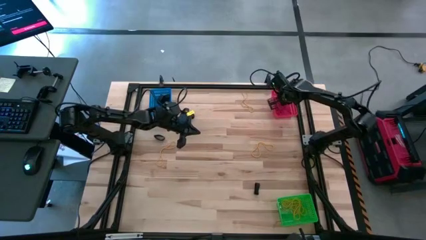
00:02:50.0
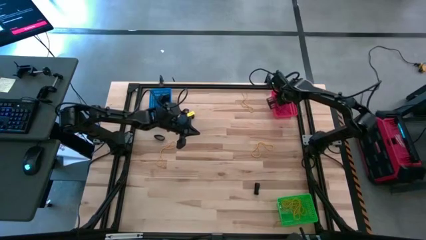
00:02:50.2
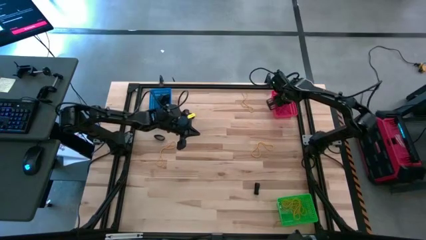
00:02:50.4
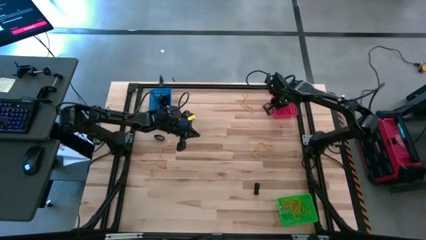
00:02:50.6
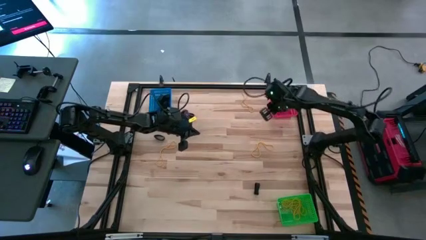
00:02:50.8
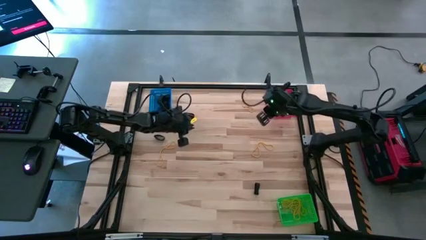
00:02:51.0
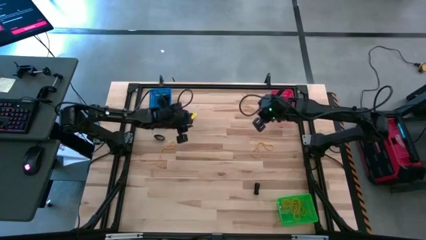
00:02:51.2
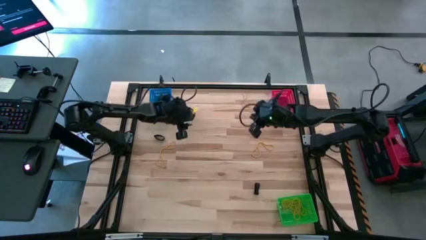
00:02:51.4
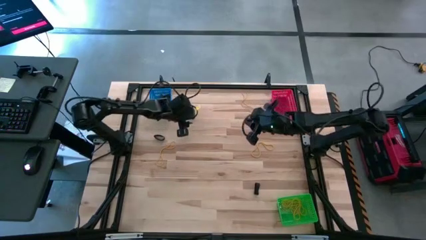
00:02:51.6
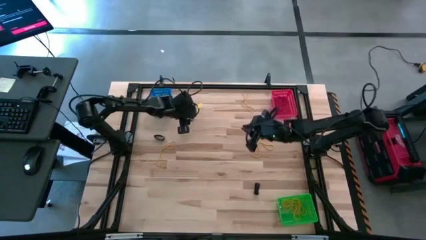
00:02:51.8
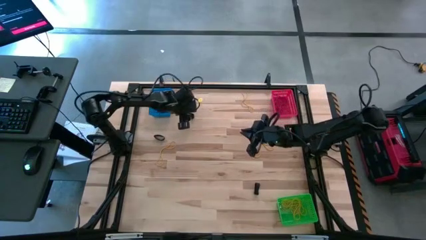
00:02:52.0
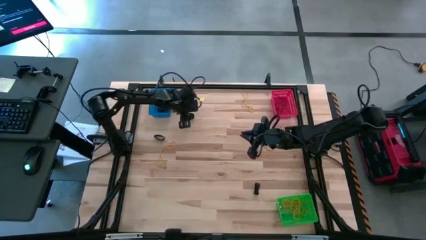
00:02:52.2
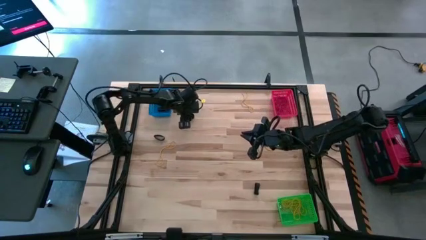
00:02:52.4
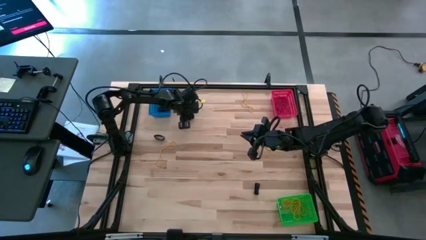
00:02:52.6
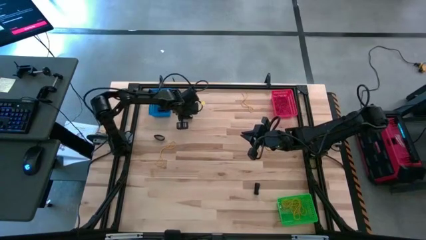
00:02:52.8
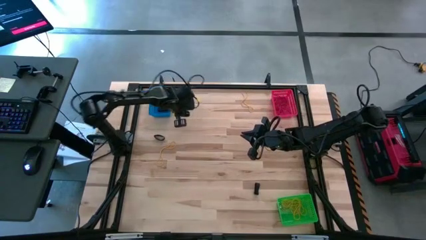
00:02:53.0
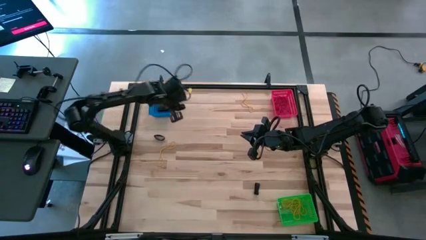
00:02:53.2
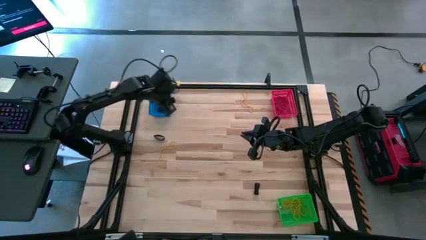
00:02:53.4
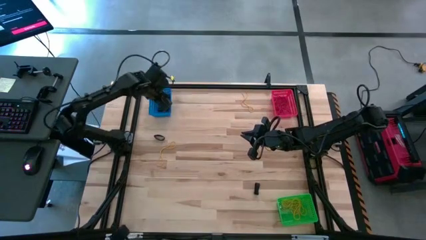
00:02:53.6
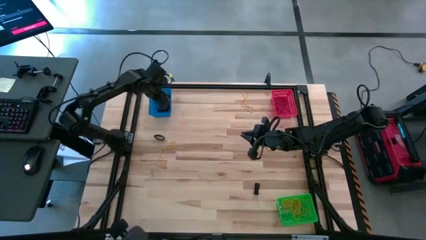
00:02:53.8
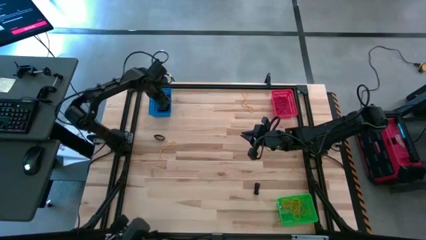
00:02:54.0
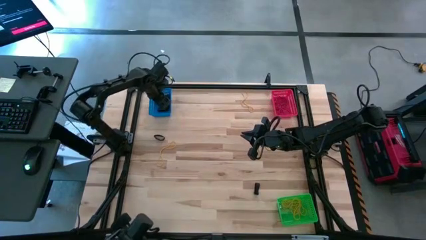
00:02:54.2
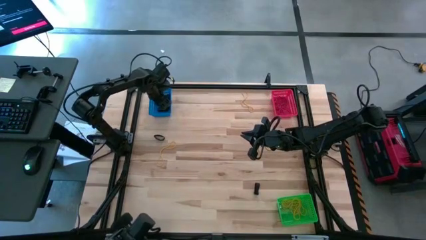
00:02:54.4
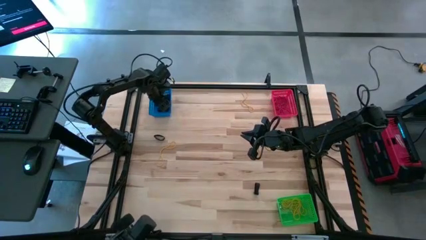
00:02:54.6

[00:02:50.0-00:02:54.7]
Task: Sort rubber bands into baskets
Put the black rubber band into the blue bin

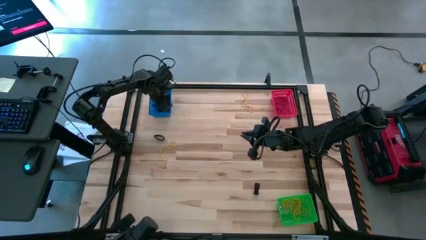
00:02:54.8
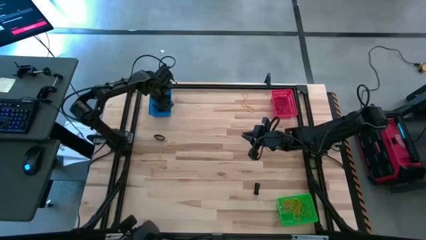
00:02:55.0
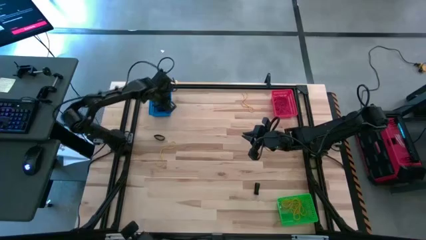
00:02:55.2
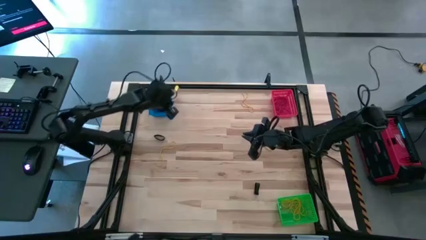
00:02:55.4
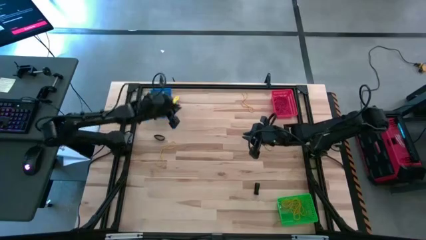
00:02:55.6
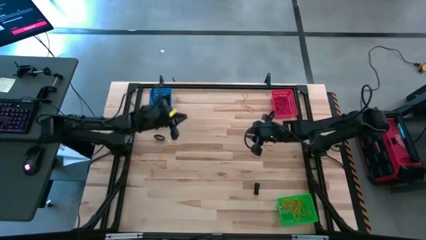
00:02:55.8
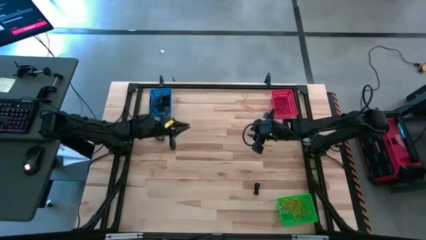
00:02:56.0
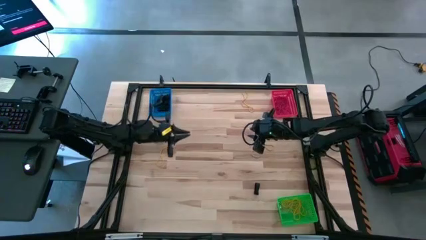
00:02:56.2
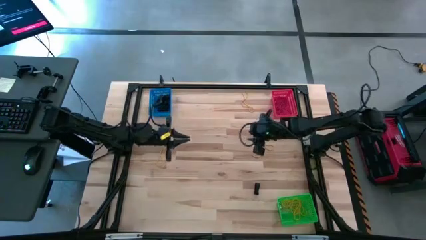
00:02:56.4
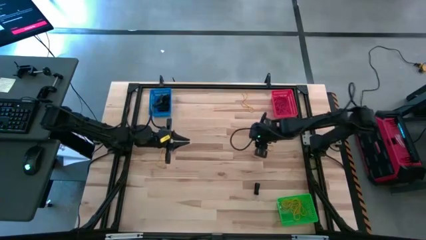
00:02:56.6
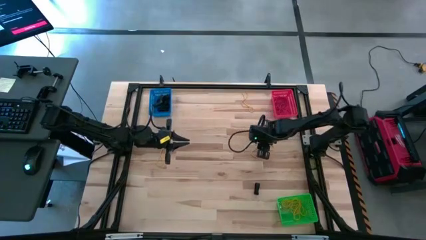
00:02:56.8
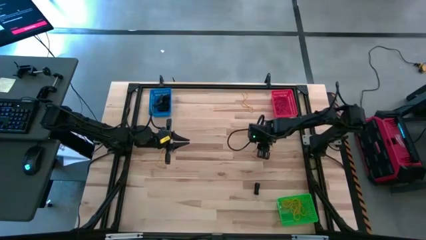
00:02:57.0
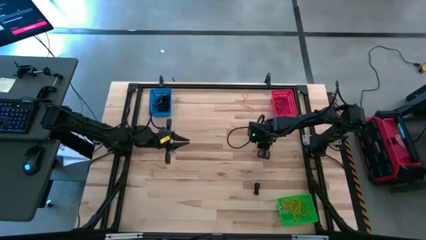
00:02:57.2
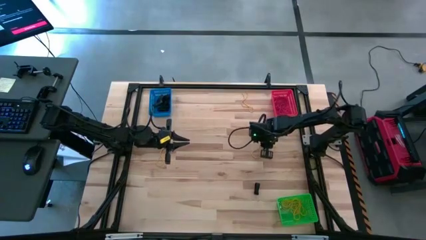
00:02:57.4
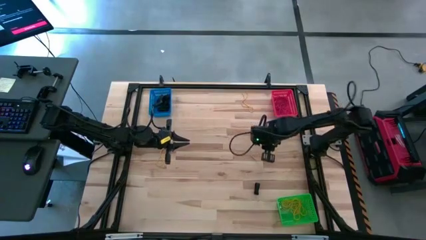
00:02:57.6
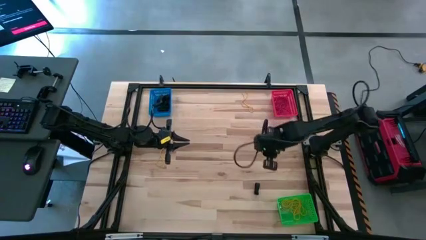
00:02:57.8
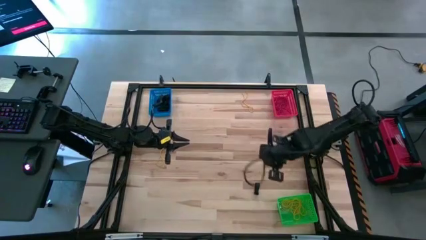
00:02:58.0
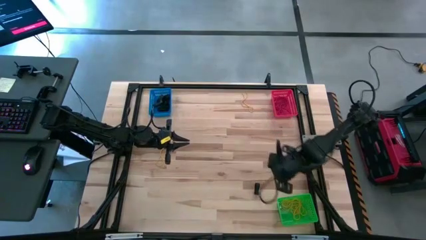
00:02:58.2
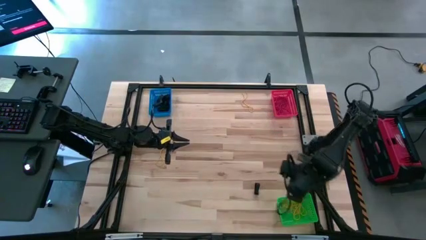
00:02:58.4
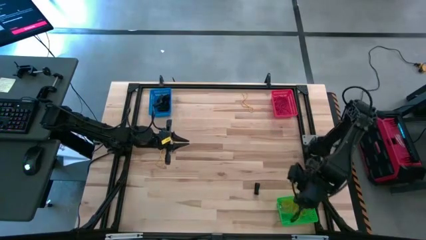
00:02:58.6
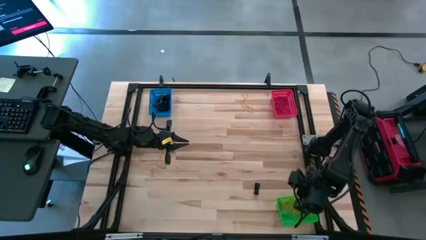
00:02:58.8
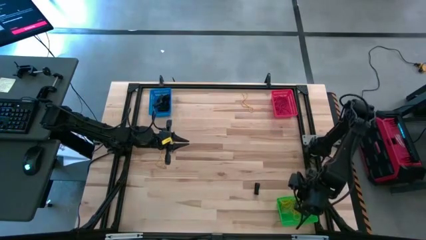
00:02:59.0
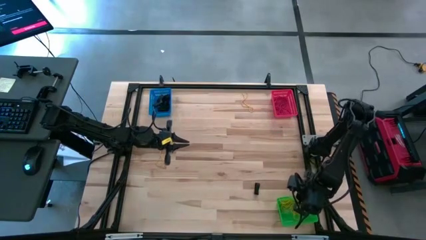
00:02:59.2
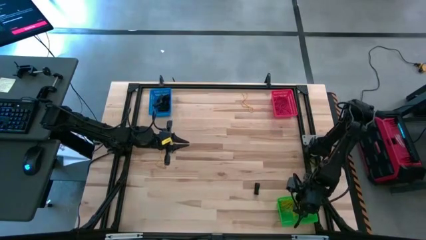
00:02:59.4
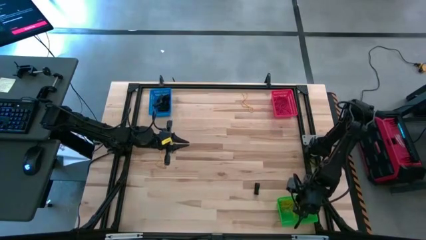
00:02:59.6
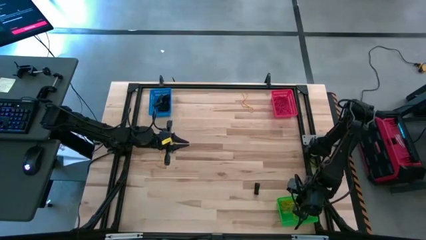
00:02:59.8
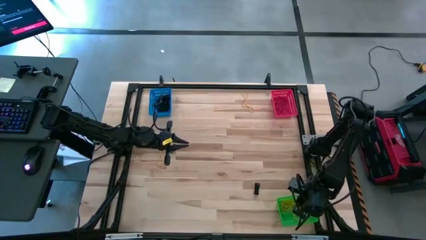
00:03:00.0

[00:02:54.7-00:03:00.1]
Put the yellow rubber band into the green bin

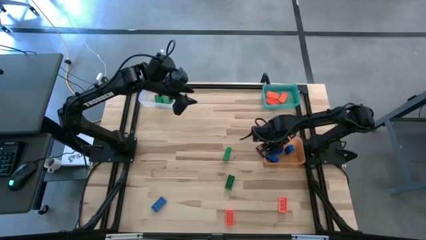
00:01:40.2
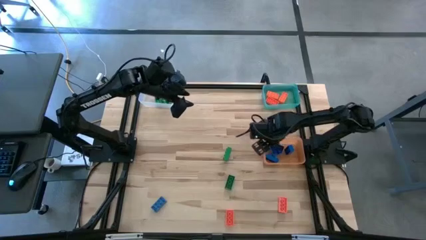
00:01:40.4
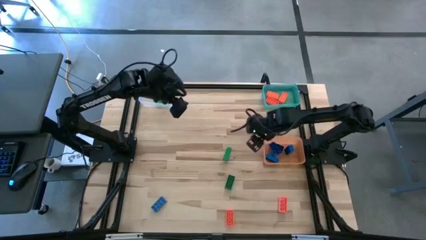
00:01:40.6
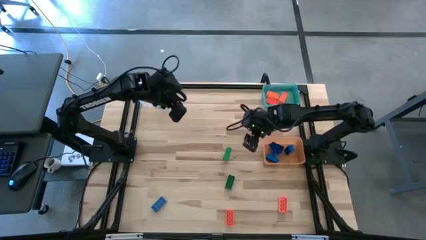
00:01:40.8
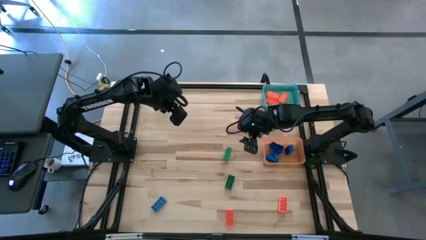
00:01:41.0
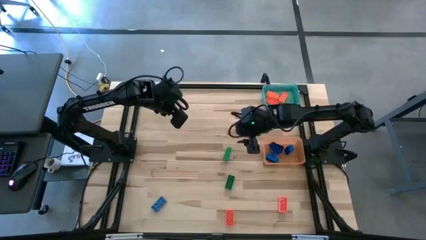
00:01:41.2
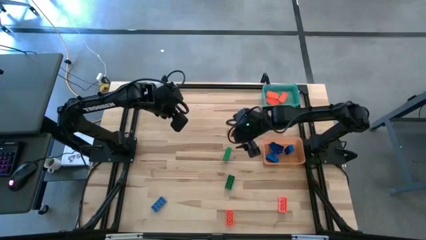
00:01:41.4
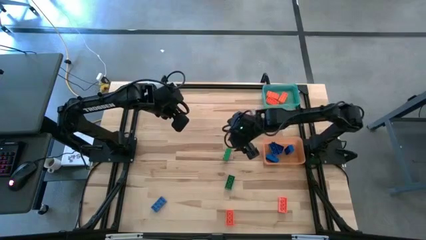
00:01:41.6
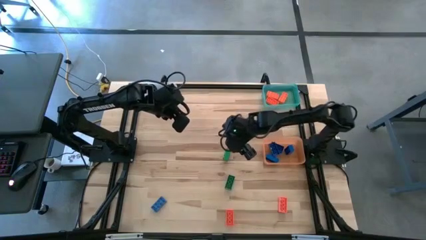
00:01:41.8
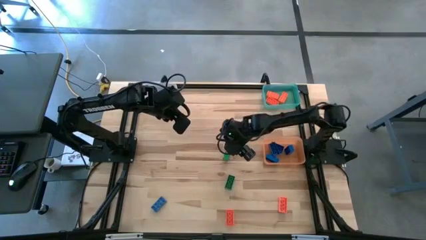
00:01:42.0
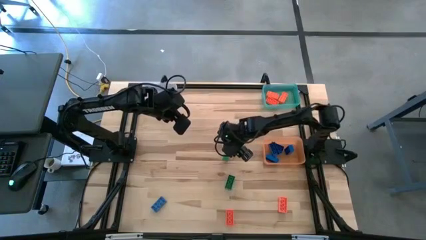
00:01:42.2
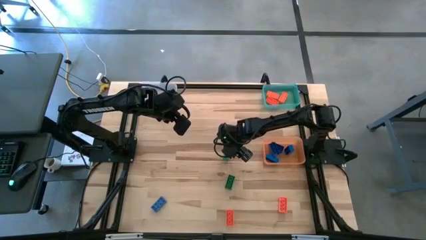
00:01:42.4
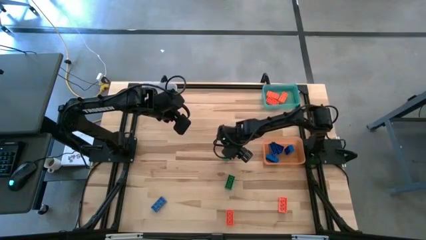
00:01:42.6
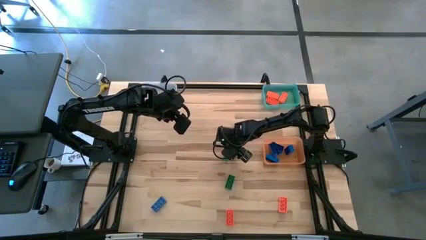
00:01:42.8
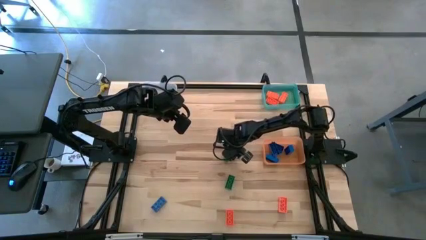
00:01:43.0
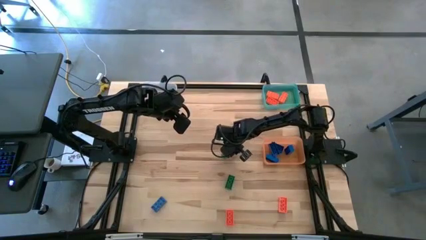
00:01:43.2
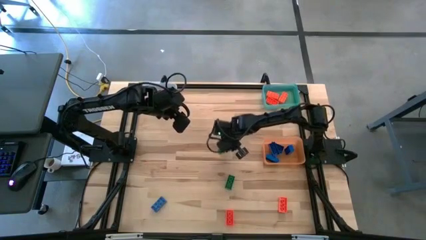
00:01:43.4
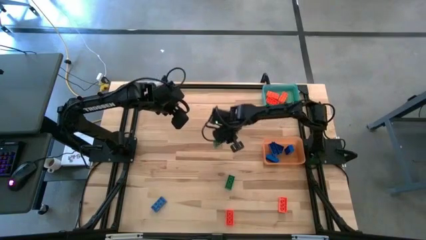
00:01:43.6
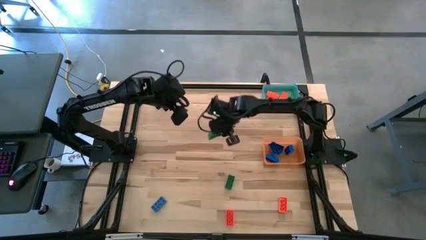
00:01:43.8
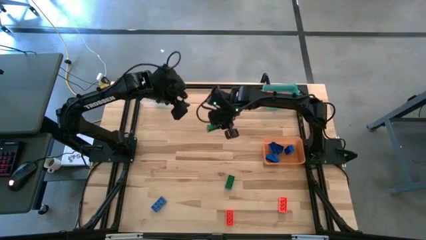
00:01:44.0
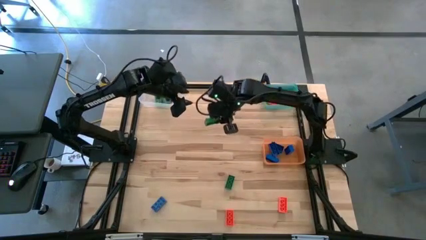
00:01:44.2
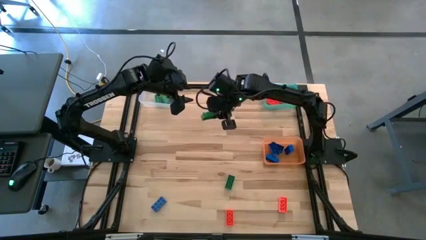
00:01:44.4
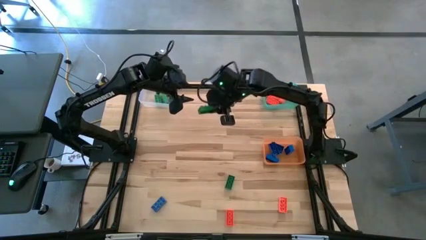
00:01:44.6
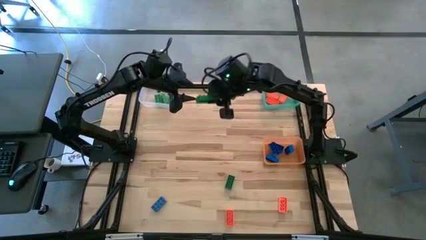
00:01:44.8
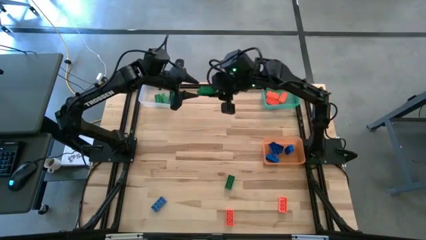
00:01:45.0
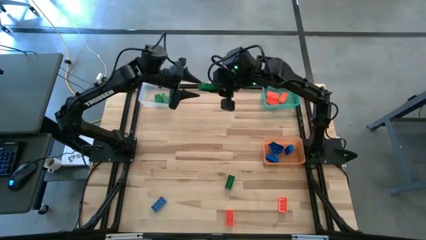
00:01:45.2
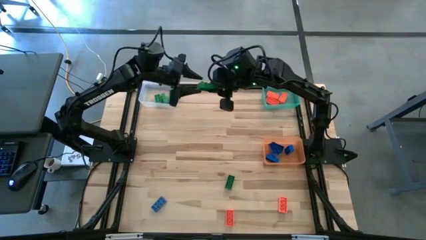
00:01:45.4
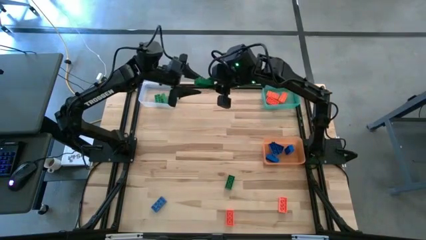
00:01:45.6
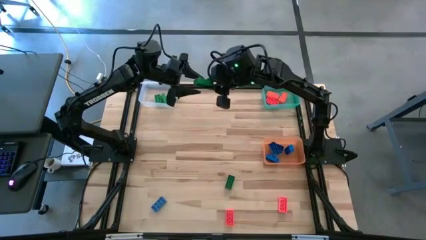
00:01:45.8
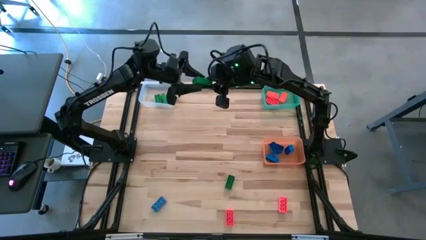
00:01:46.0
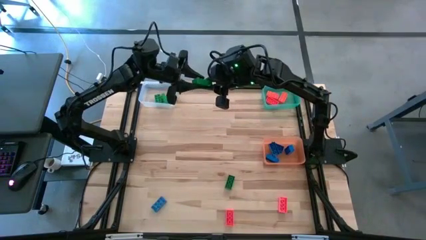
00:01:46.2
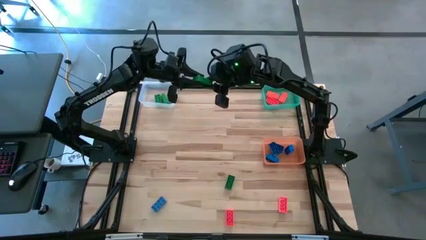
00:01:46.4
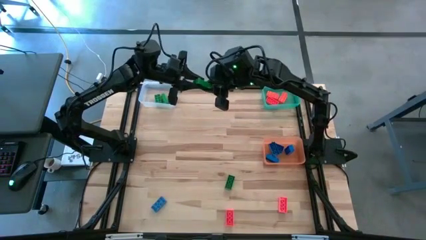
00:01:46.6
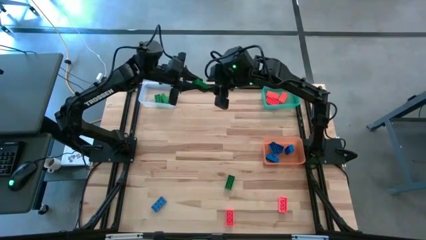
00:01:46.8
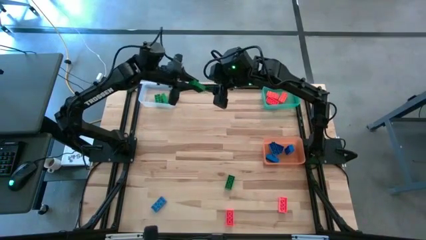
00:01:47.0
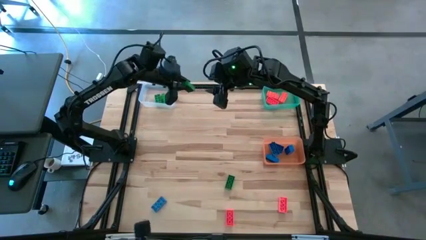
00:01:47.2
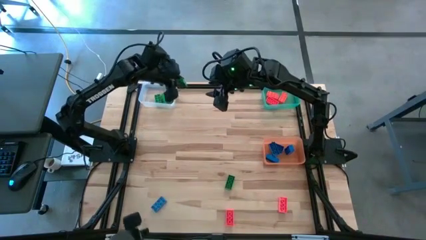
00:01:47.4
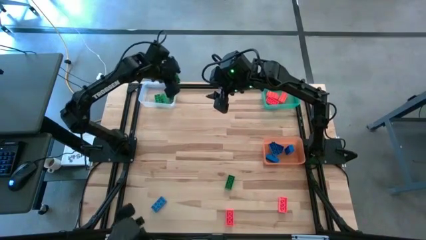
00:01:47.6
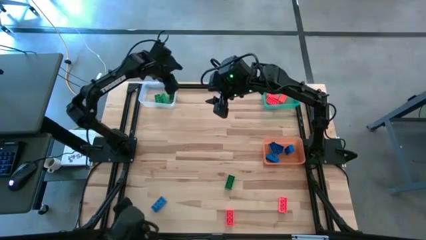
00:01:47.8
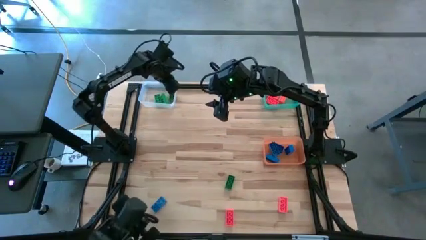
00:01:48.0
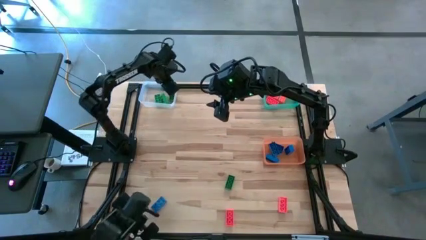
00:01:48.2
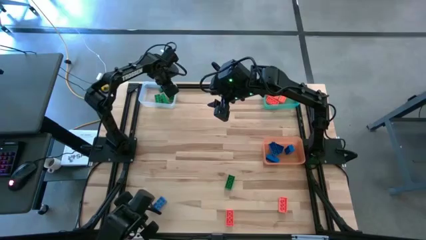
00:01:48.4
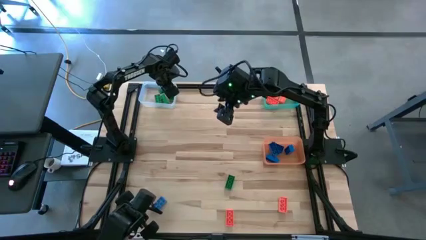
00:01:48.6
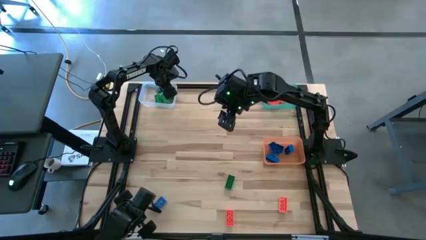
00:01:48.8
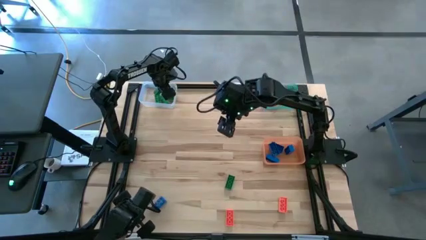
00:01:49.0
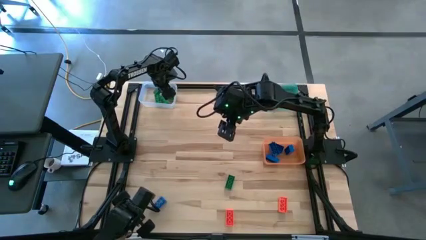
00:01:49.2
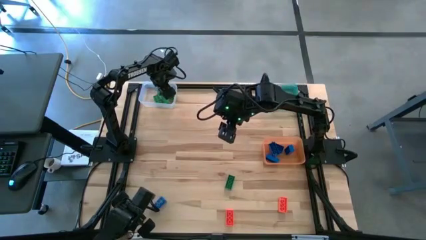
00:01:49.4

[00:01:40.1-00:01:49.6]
Task: Sort & place blocks by color
Put the green game piece into the transparent bin
